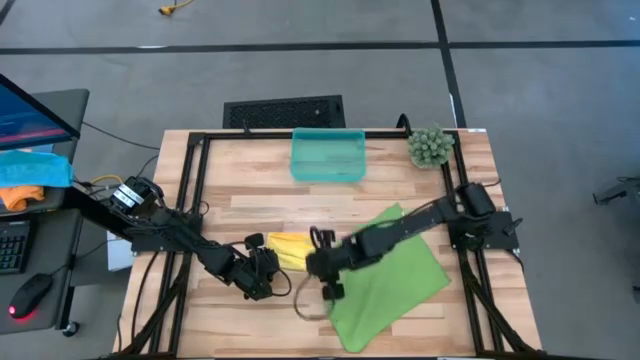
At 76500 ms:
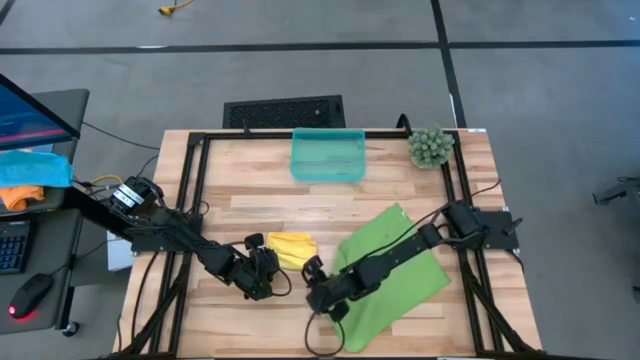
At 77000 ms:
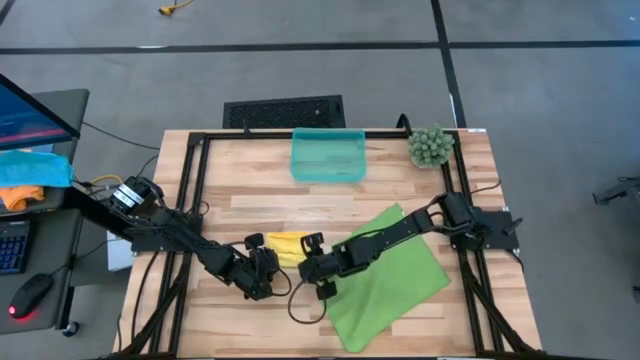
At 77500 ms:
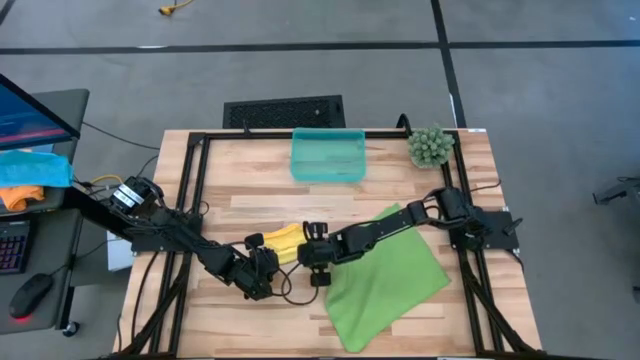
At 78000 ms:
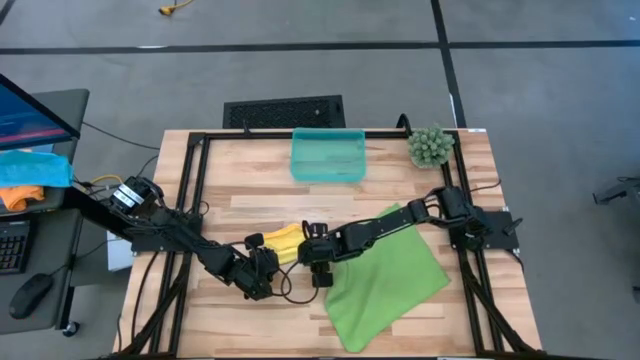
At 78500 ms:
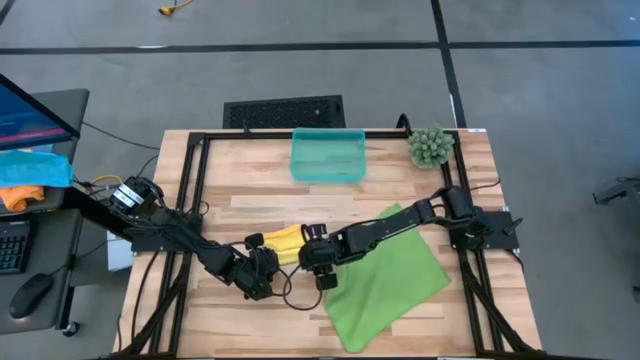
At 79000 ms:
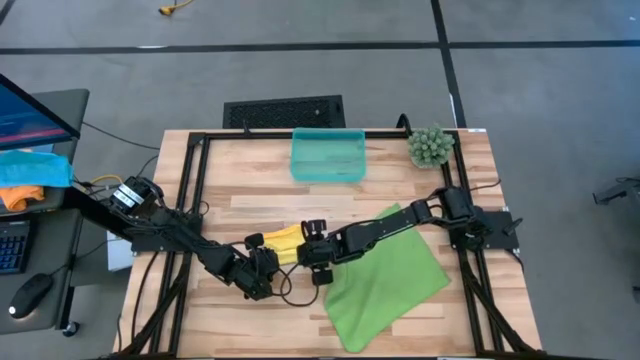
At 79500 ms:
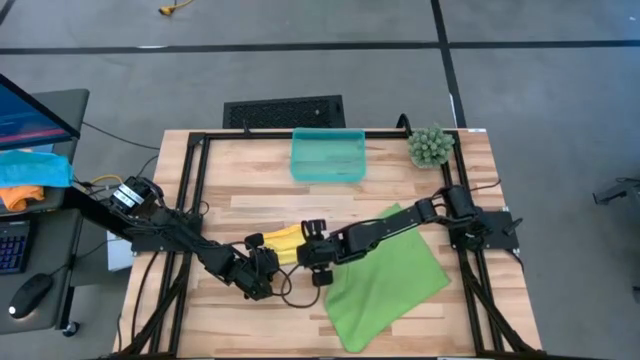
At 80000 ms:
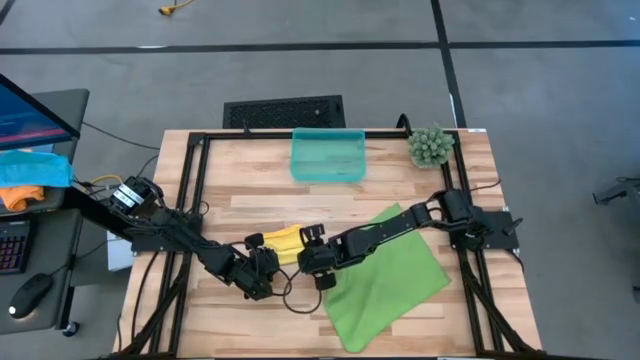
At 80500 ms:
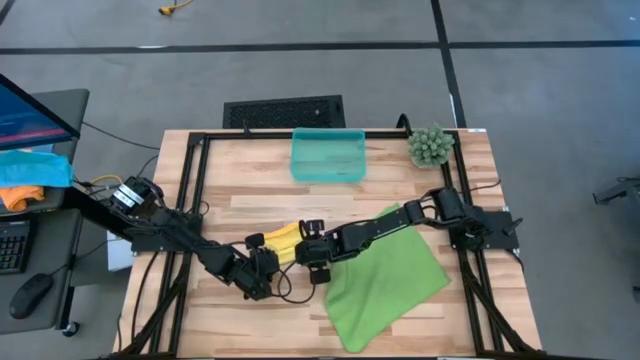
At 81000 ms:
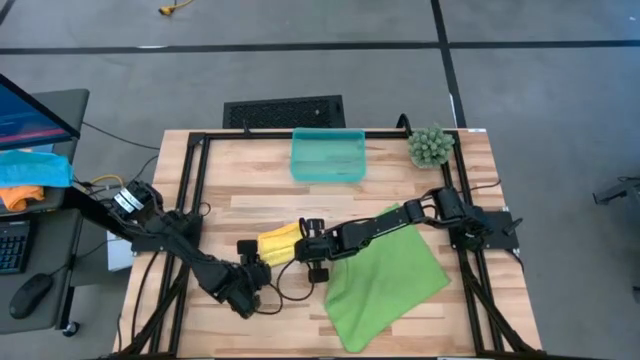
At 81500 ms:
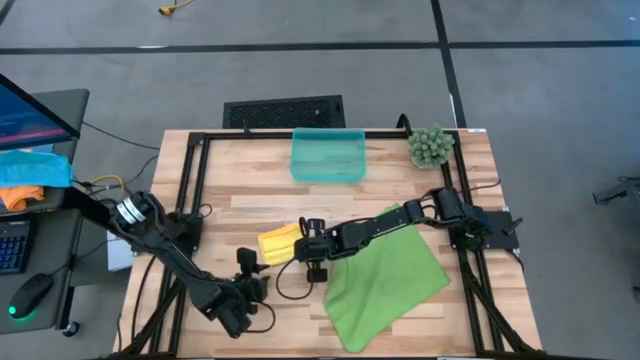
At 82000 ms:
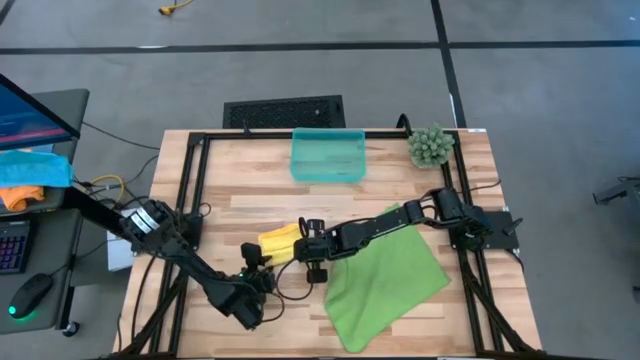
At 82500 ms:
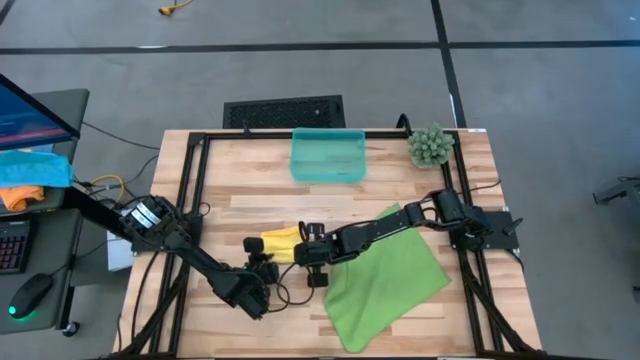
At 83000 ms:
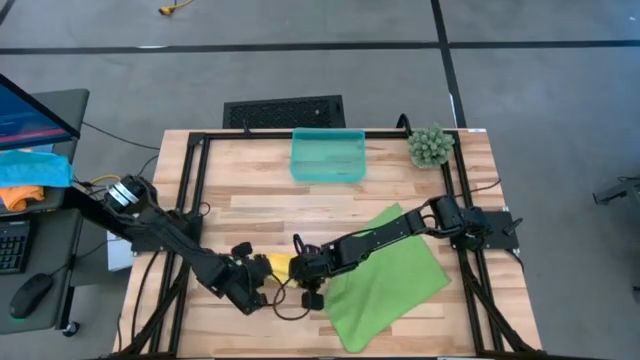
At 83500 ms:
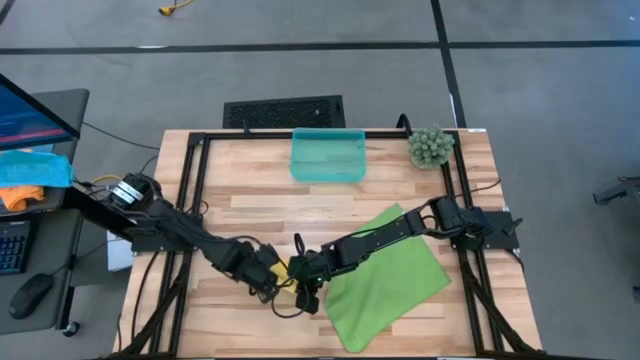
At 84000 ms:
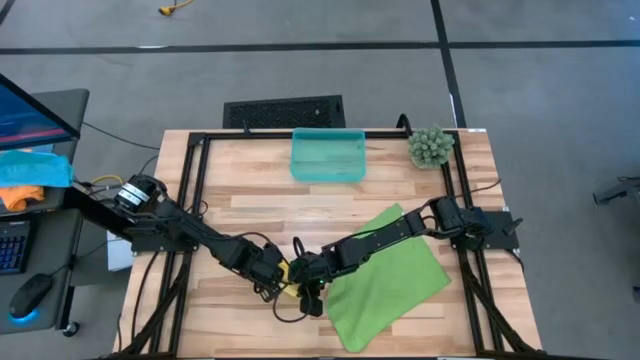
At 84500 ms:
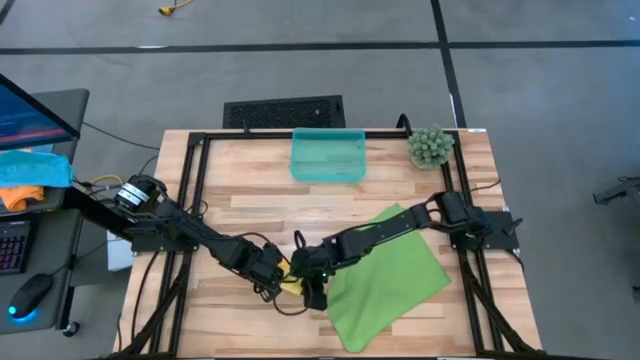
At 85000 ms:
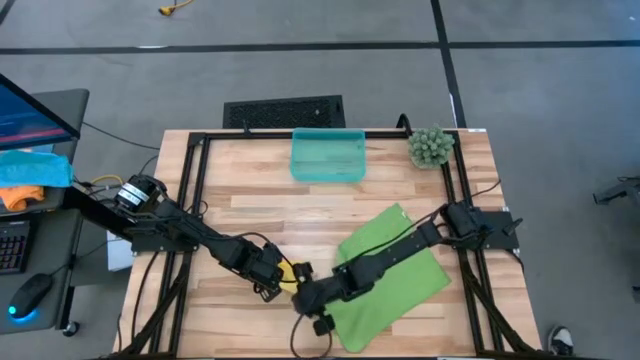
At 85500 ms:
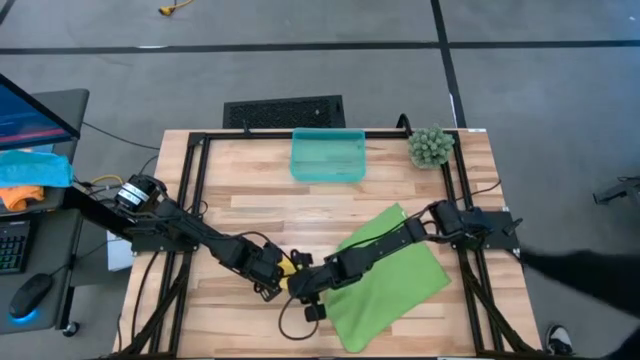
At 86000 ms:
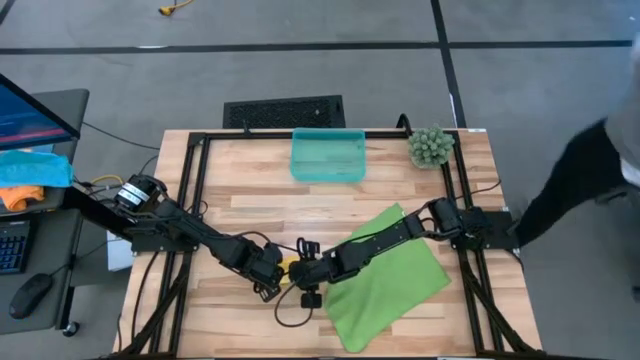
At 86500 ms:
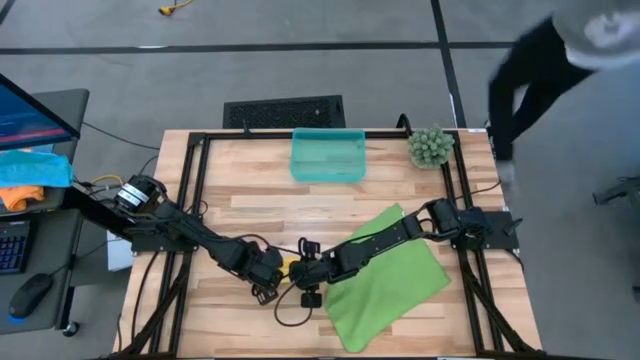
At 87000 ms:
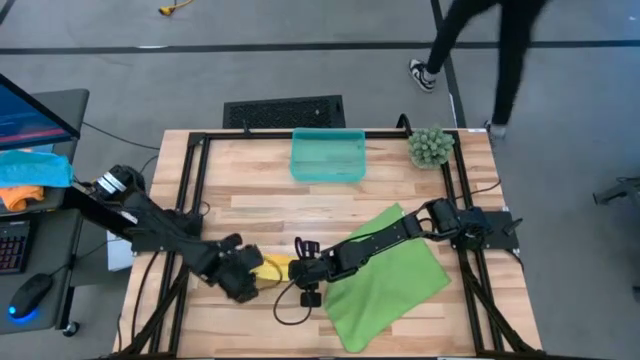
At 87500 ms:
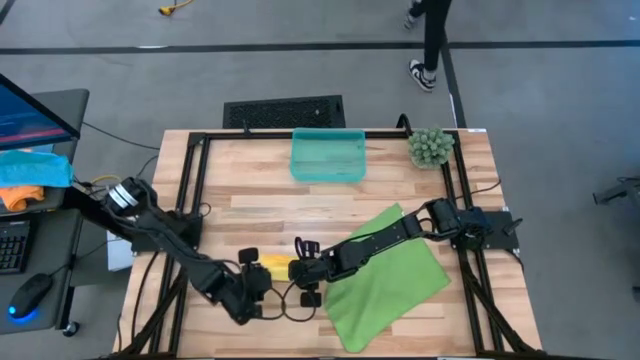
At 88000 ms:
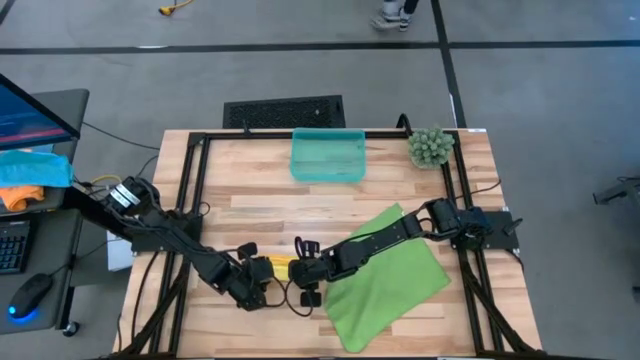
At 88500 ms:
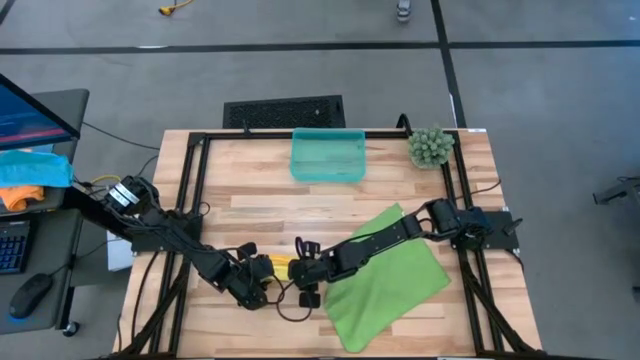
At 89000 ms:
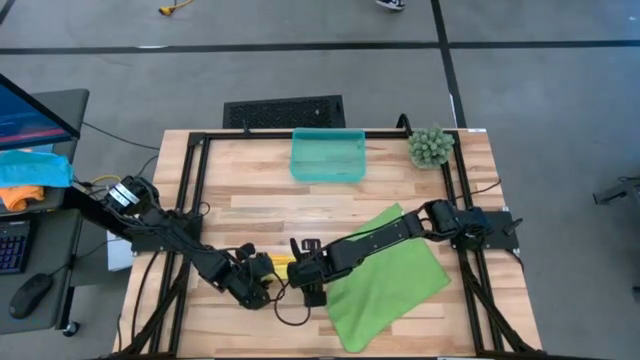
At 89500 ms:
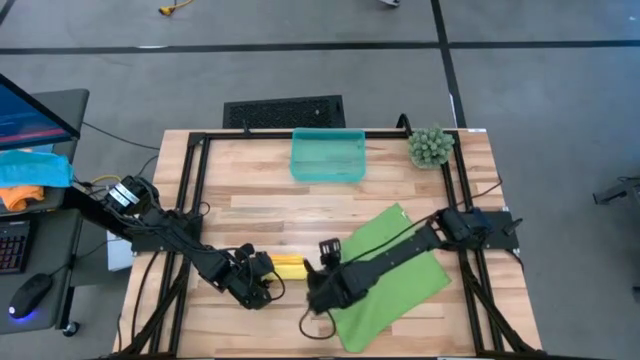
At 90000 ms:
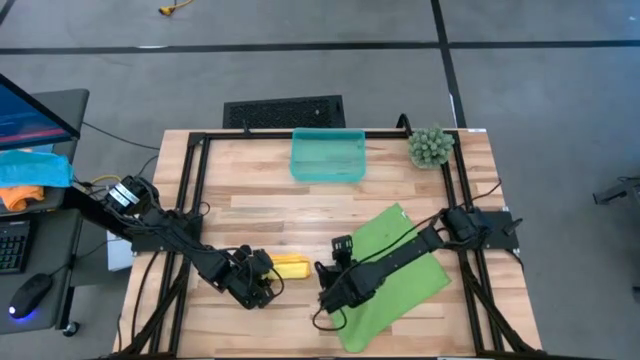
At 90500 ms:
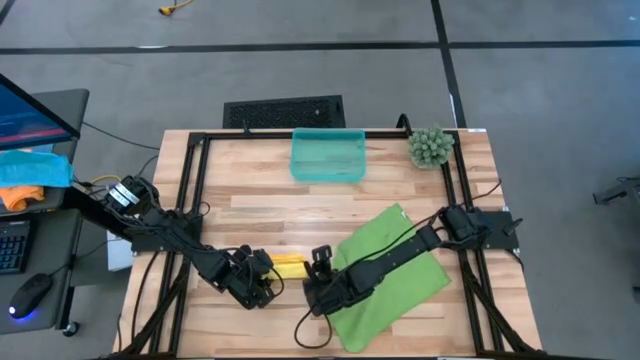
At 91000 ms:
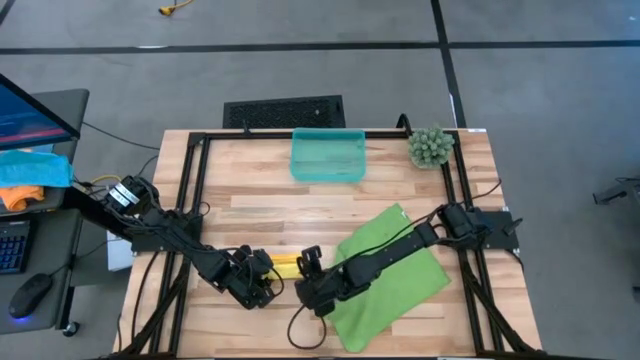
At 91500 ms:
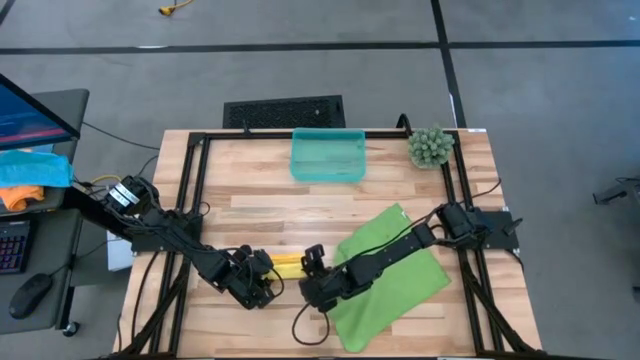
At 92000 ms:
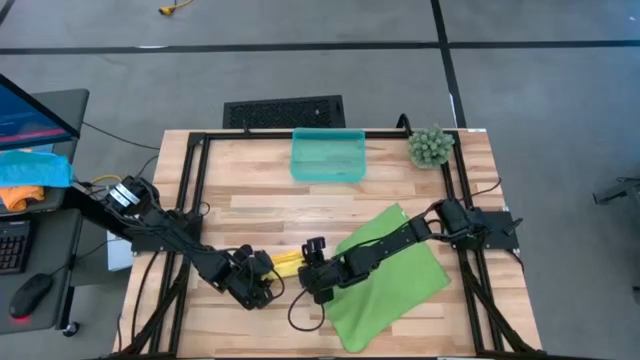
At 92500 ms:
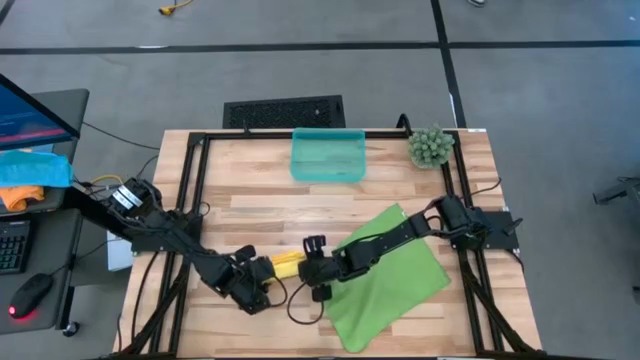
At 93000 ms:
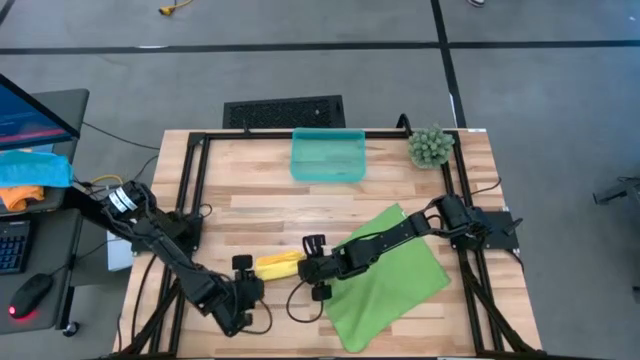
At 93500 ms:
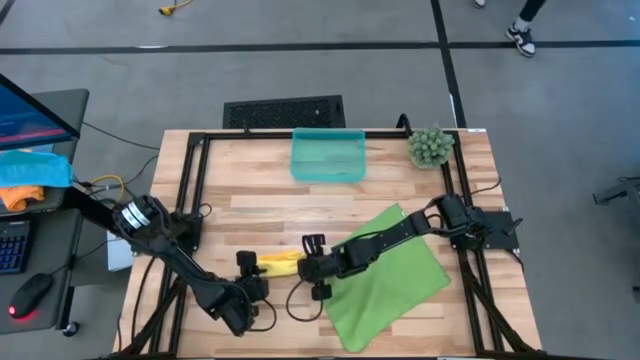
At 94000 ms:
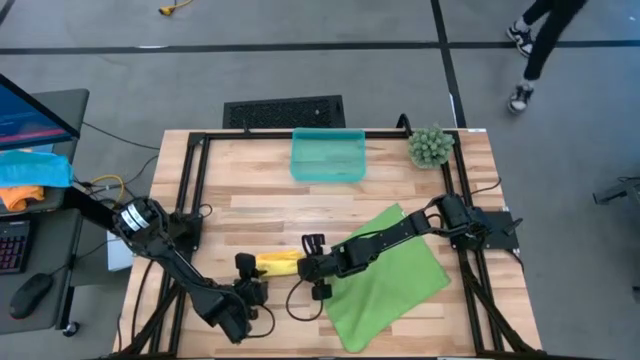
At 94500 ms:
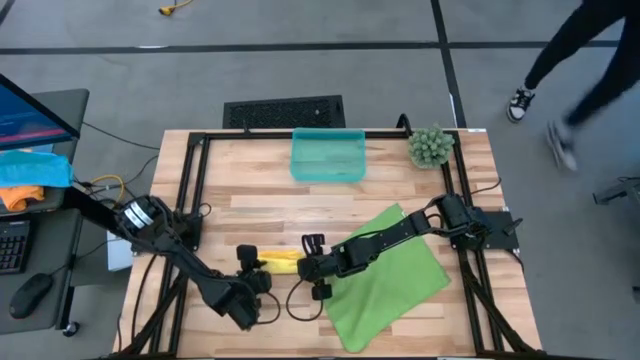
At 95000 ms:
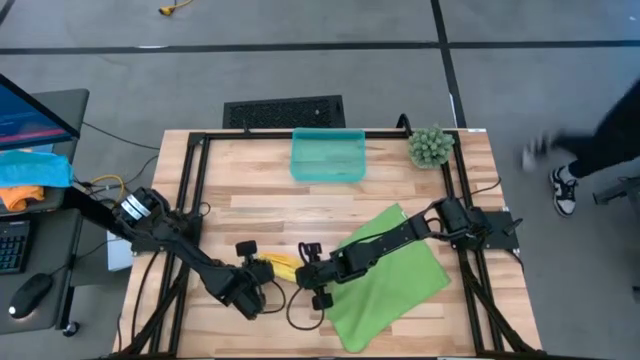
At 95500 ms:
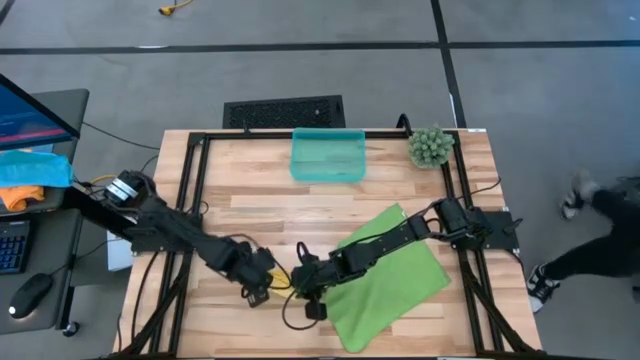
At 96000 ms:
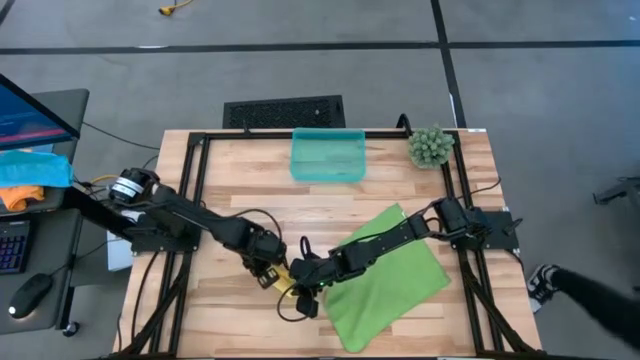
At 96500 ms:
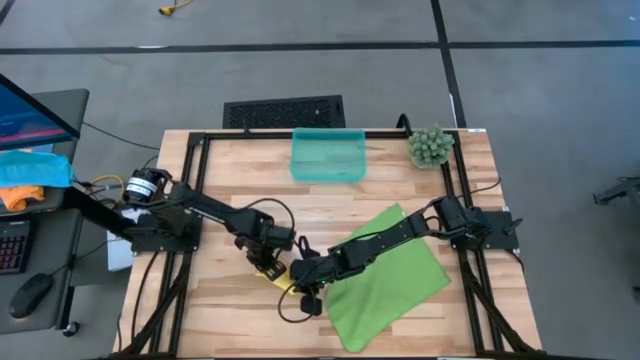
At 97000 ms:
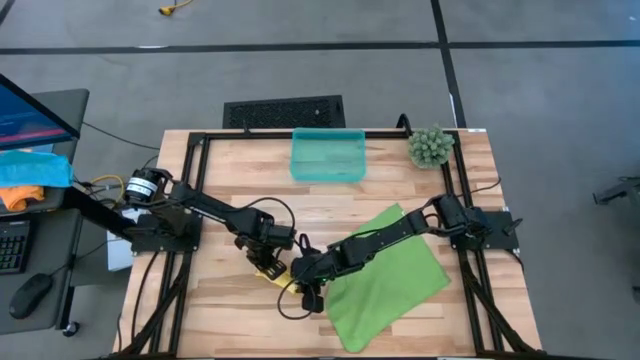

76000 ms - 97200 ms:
Task: Roll microfiber towels into tight, uniform cylinder then place into a basket
Roll the yellow microfiber towel
